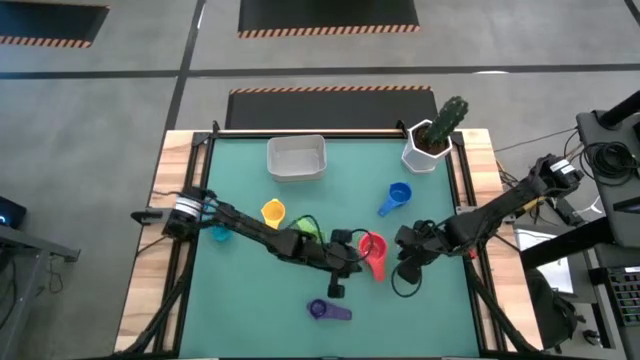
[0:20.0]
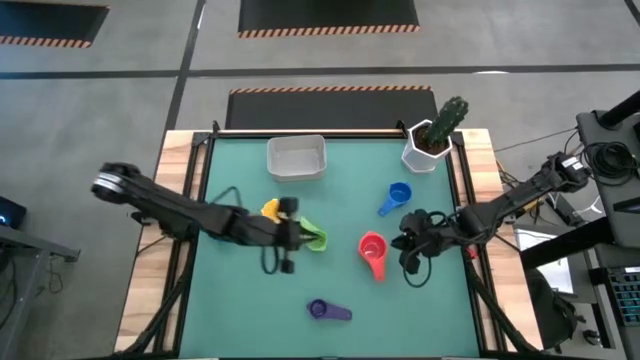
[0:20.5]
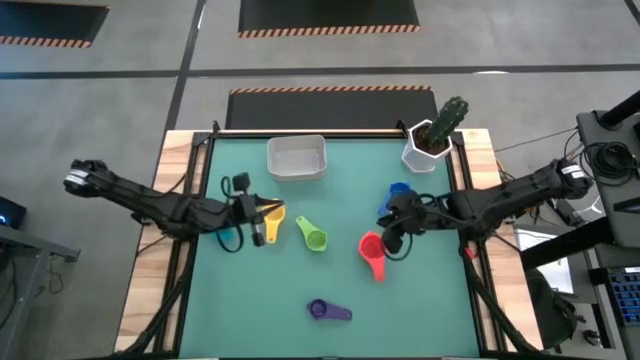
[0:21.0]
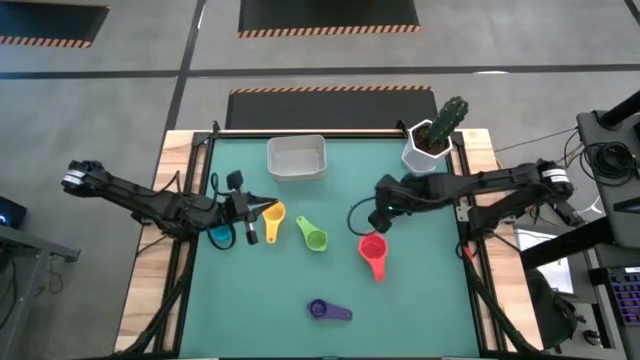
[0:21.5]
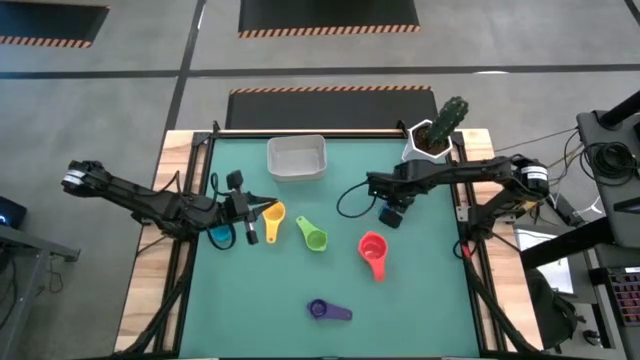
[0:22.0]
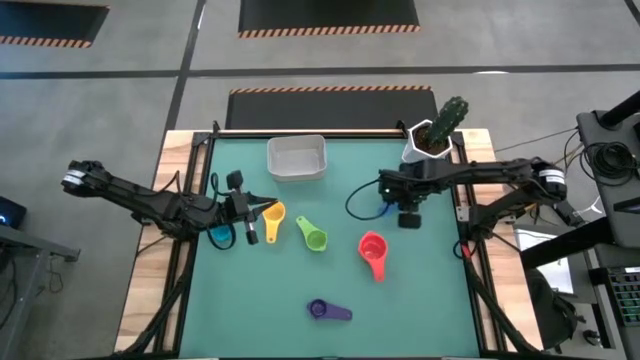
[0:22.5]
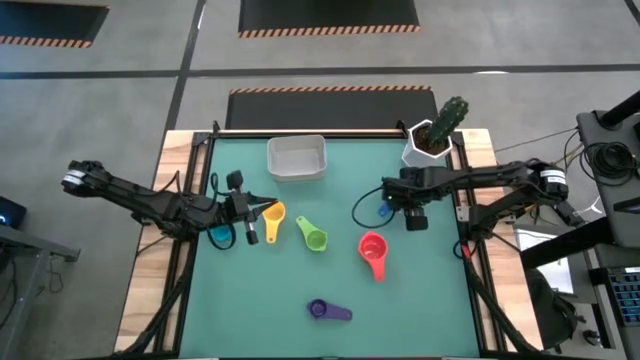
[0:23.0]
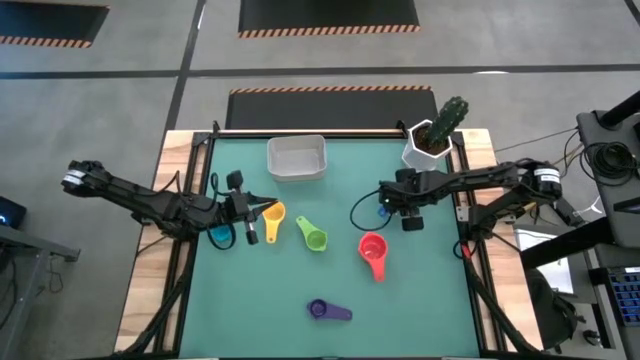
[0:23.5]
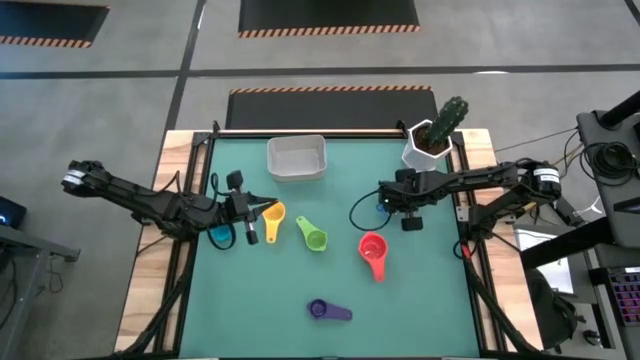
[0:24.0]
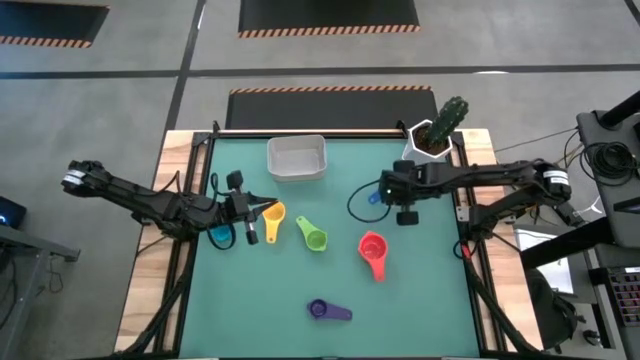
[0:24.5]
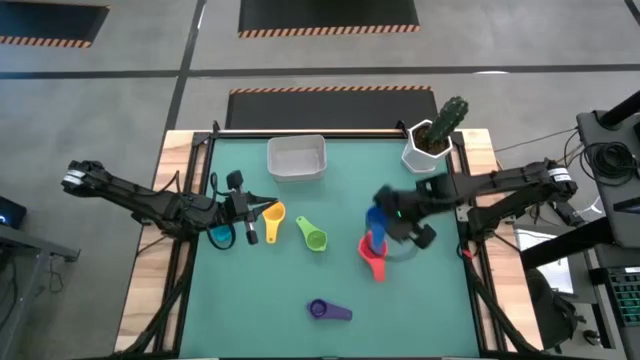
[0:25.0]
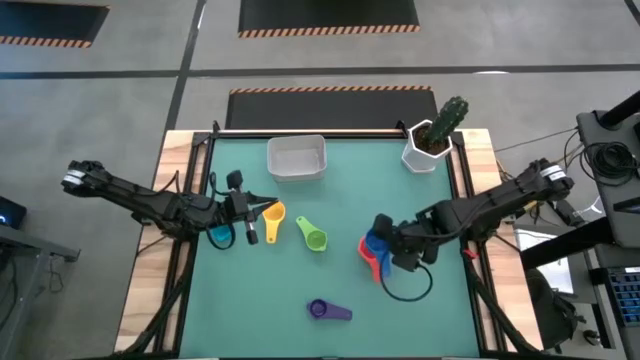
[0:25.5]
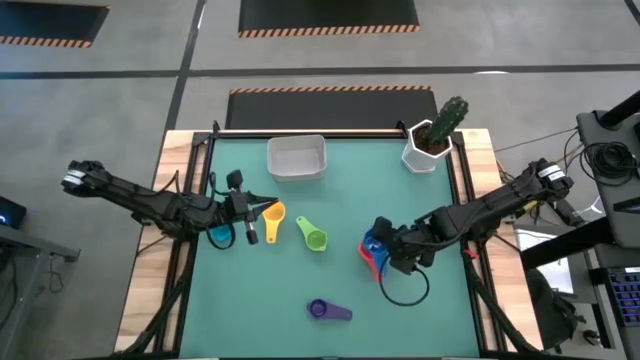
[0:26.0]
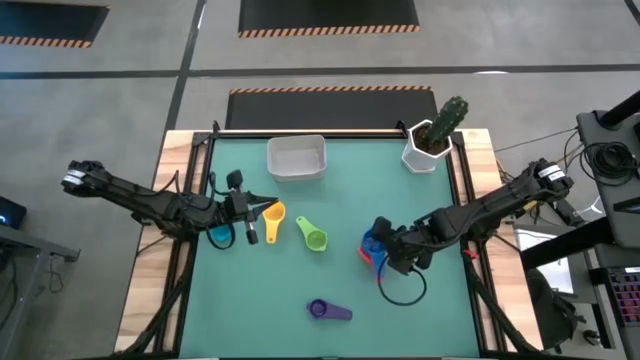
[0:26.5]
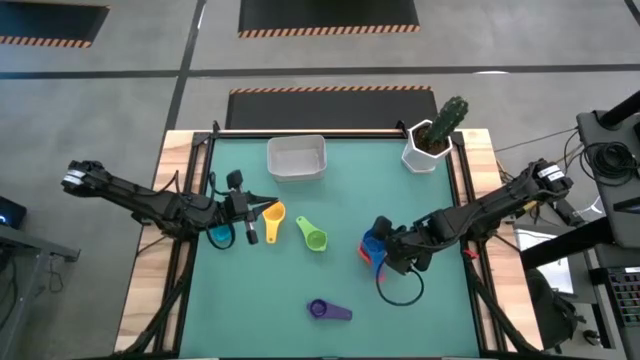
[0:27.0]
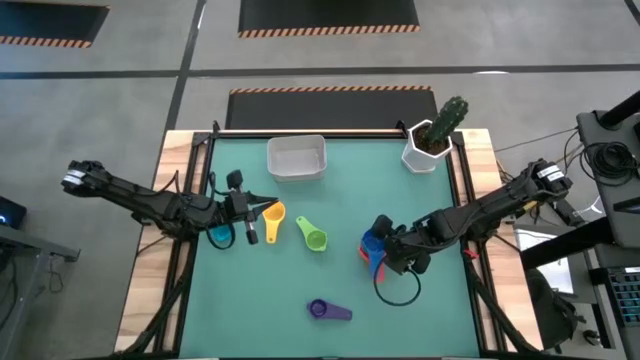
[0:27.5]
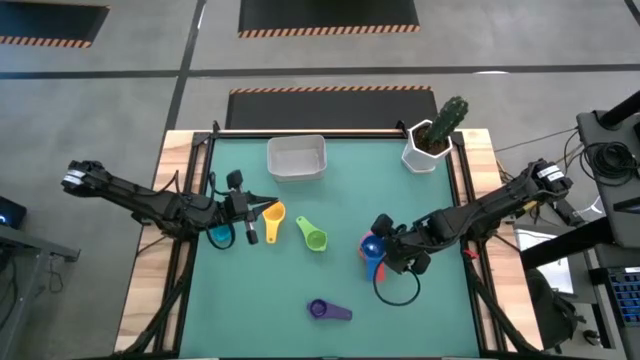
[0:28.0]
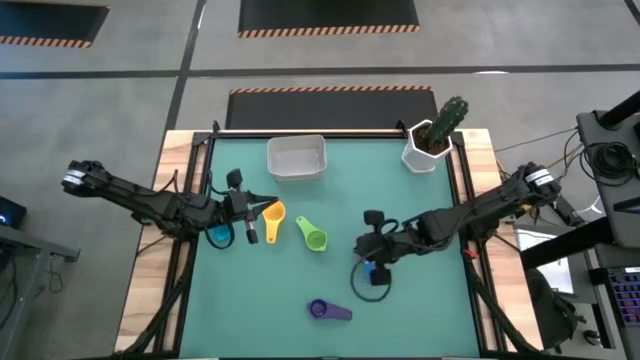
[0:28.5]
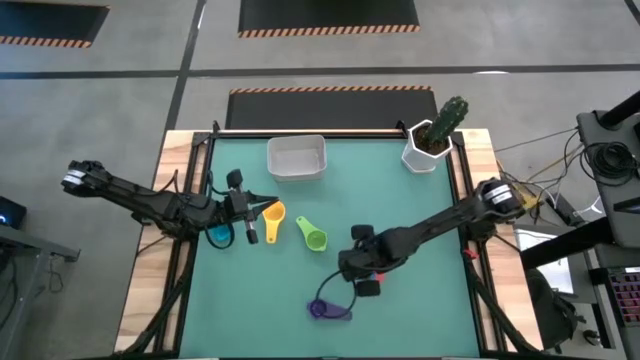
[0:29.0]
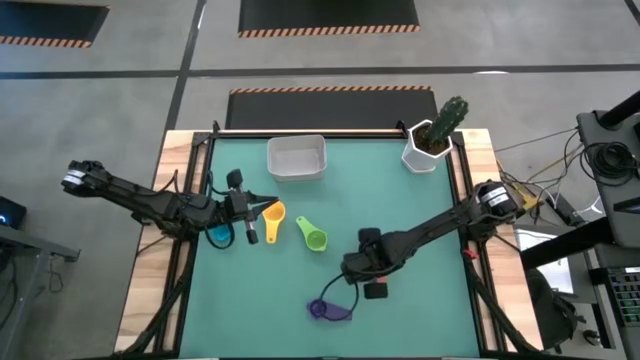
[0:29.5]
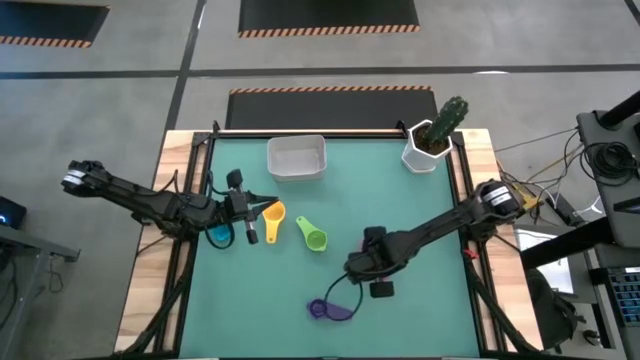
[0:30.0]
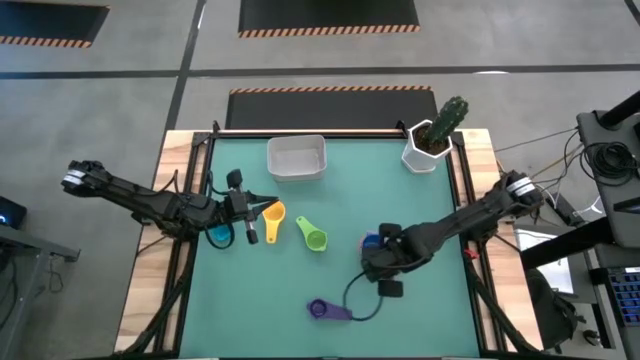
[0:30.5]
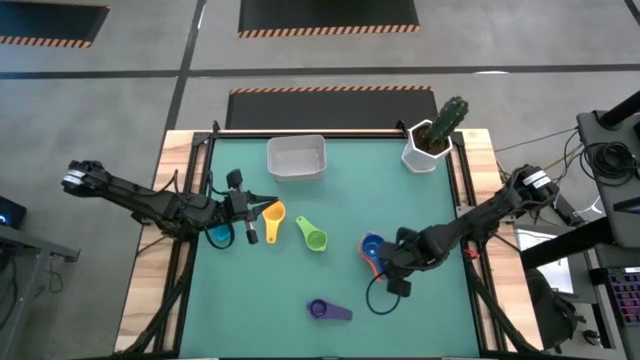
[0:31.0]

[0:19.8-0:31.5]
Task: Nest measuring cups in basket
Stack the blue measuring cup on top of the red measuring cup

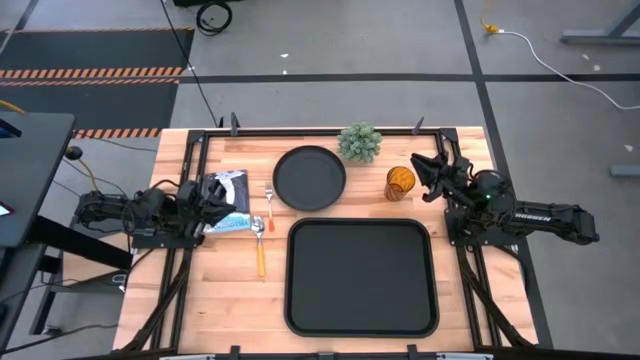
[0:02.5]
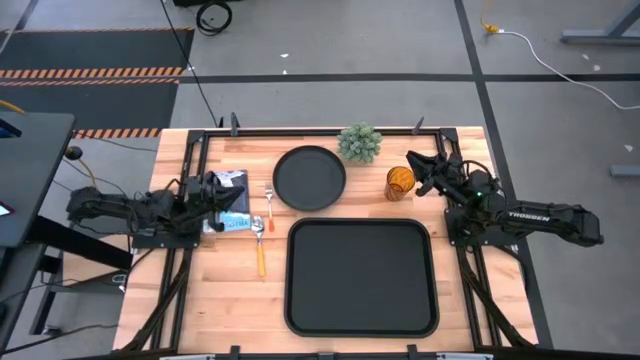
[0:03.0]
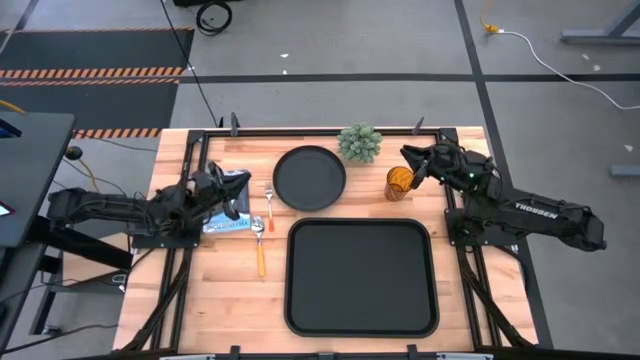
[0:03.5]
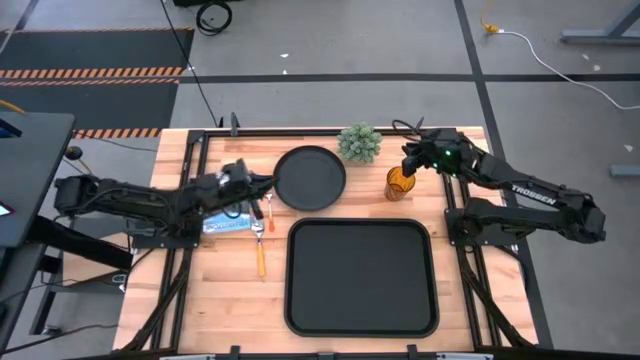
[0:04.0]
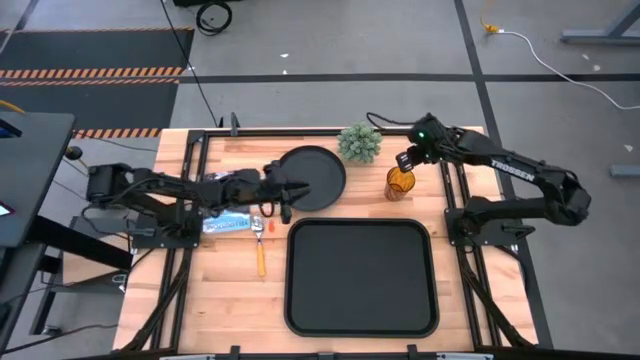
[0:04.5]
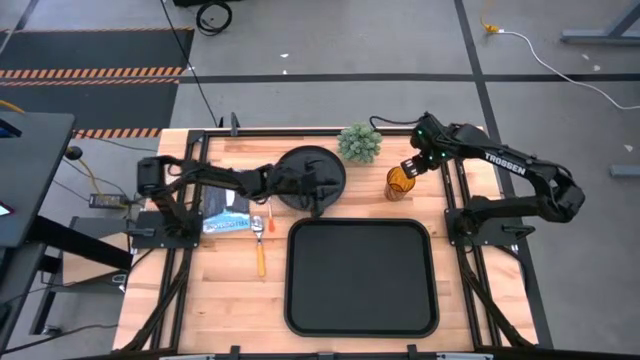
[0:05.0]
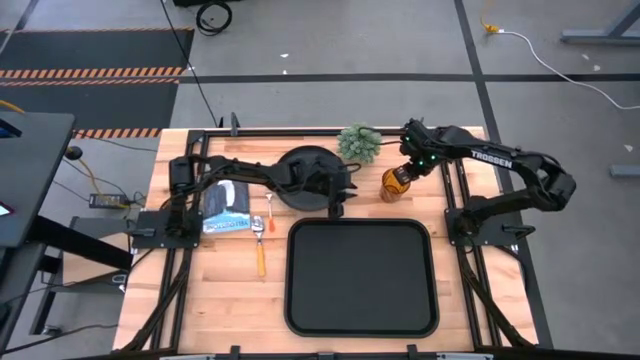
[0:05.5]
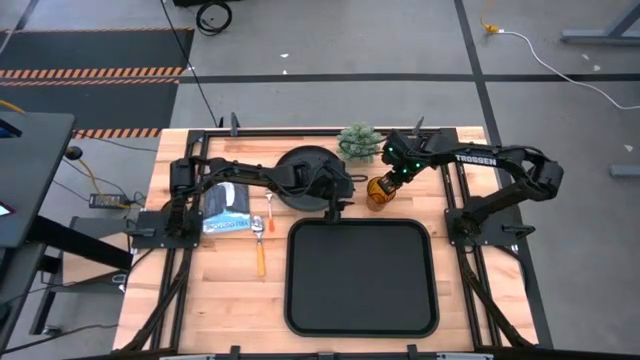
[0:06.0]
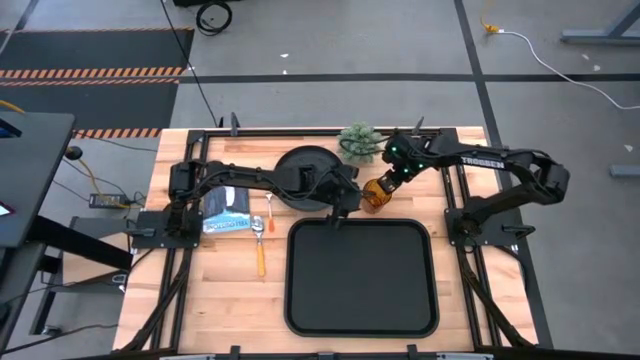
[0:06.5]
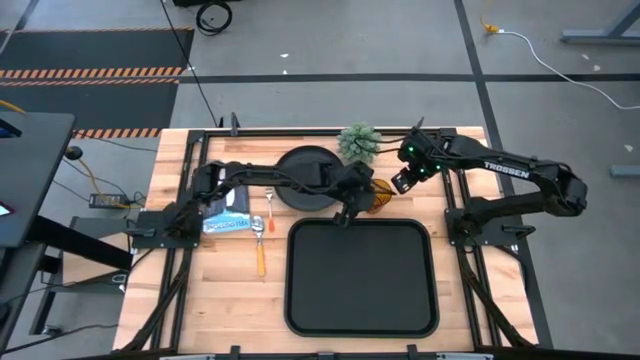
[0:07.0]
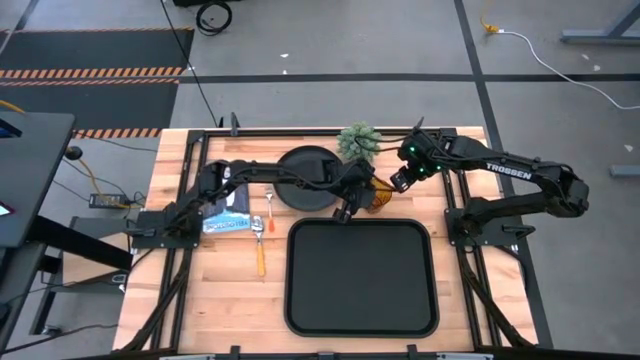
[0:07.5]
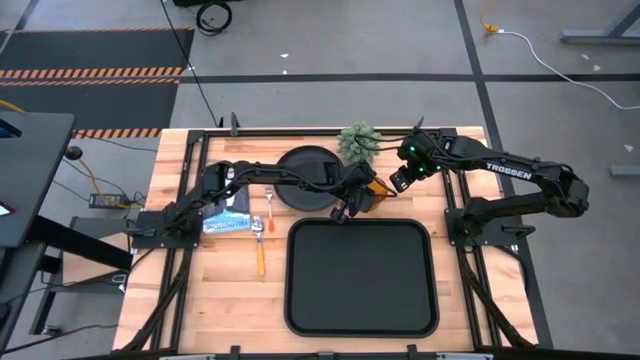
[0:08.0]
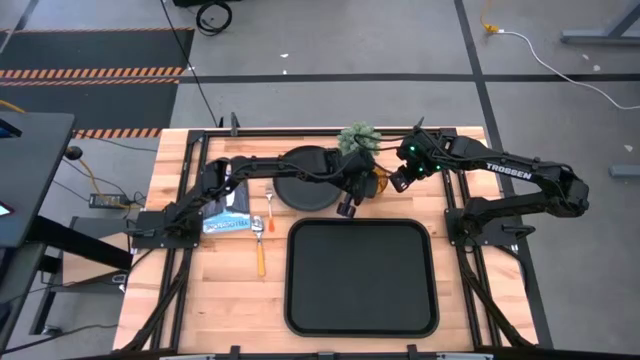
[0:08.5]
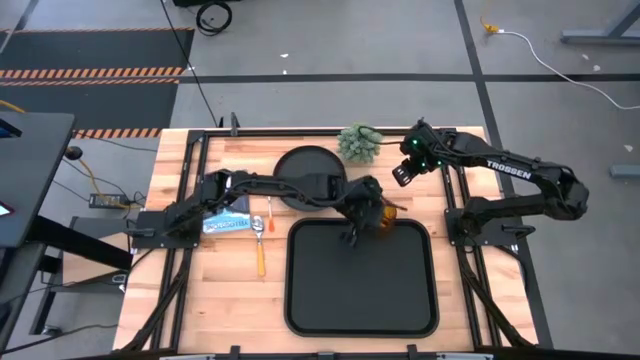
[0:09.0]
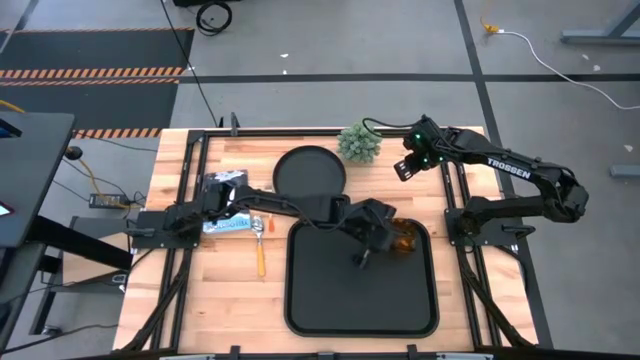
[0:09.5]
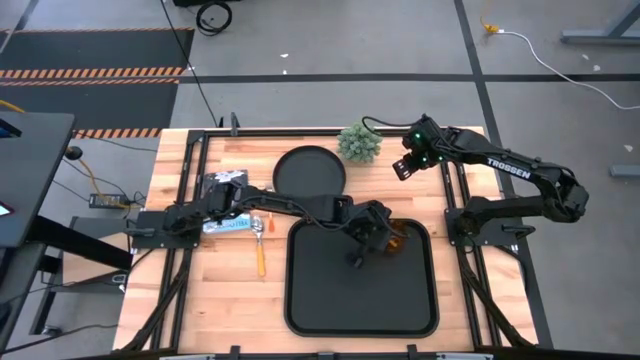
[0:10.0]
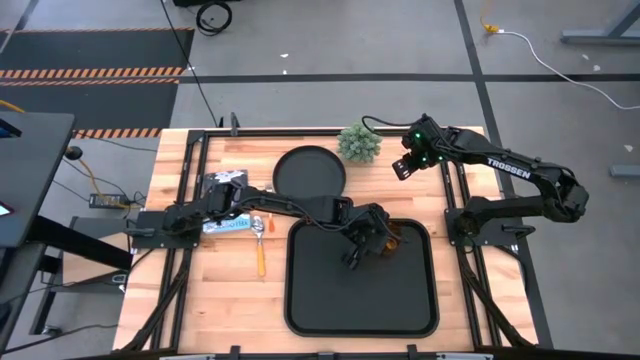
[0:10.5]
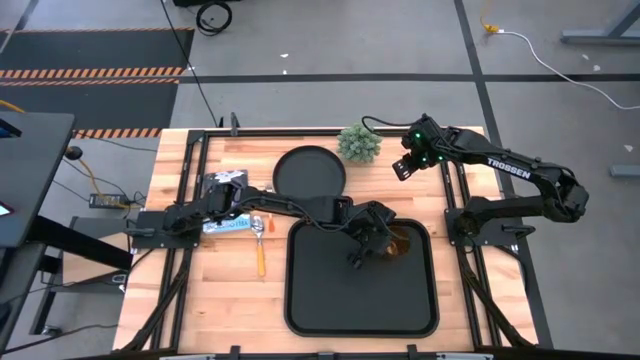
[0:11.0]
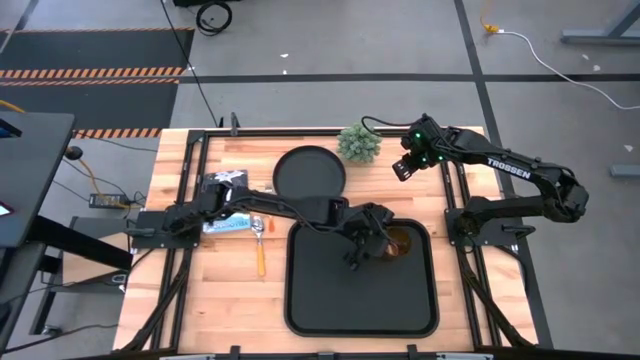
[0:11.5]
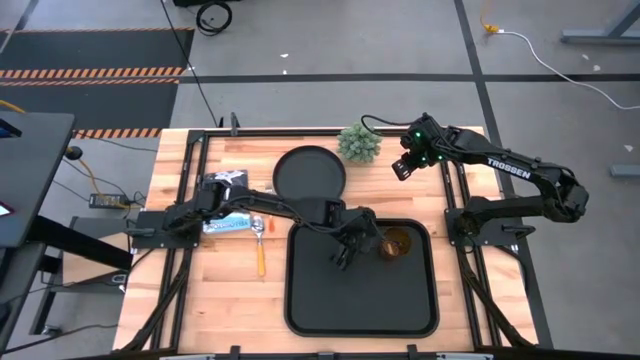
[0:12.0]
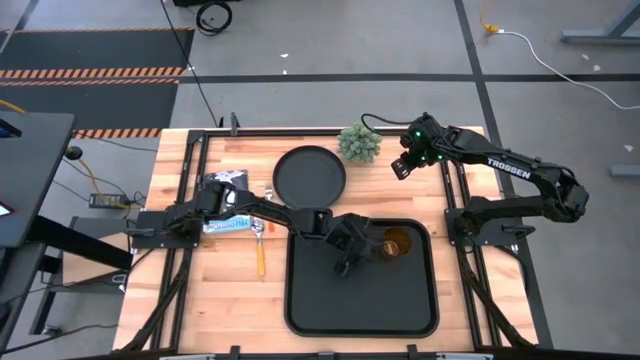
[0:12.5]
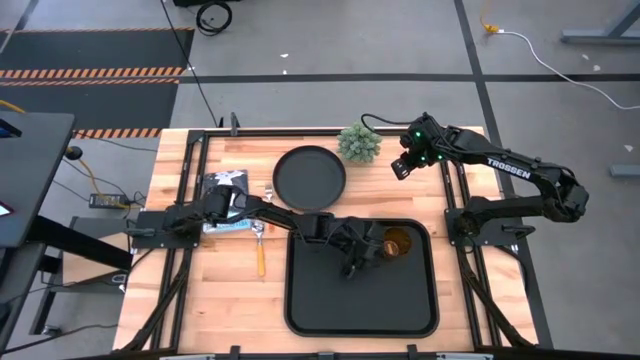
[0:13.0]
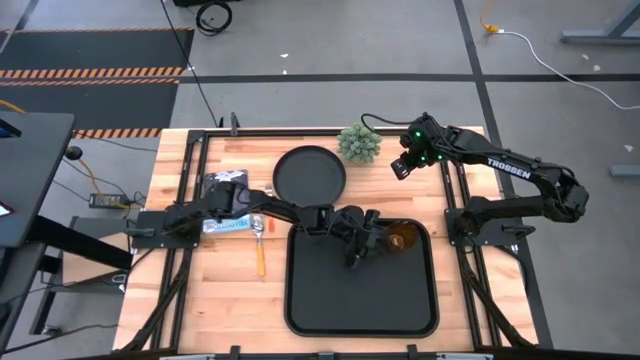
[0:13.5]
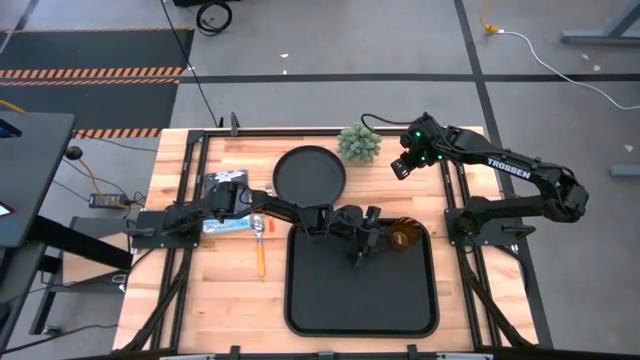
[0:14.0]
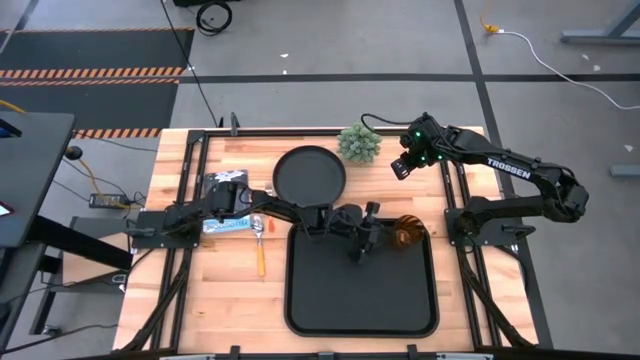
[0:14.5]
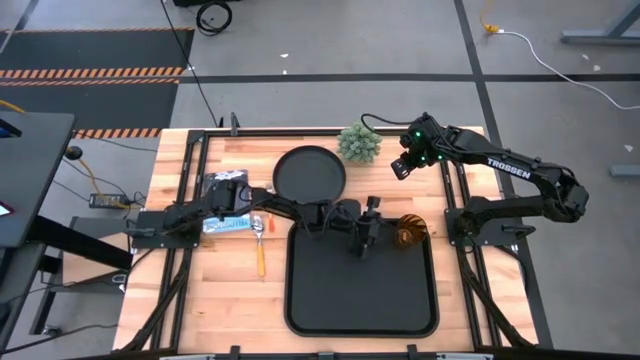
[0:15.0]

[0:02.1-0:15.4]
Task: Pick and place plate/cup/fork/spoon on tray
Put the brown cup to the top right of the black tray
